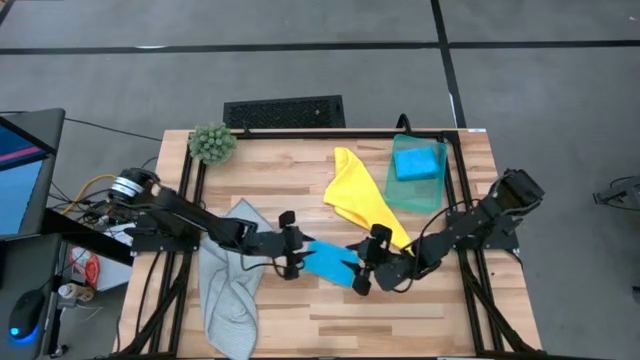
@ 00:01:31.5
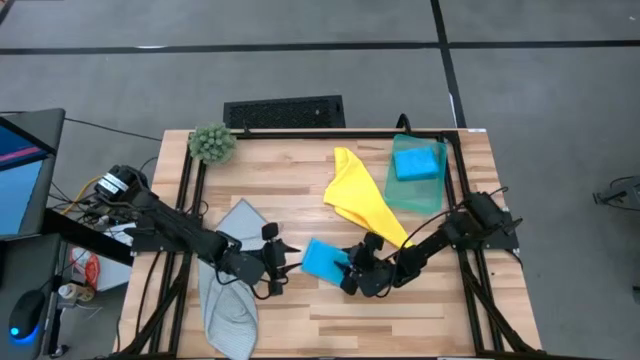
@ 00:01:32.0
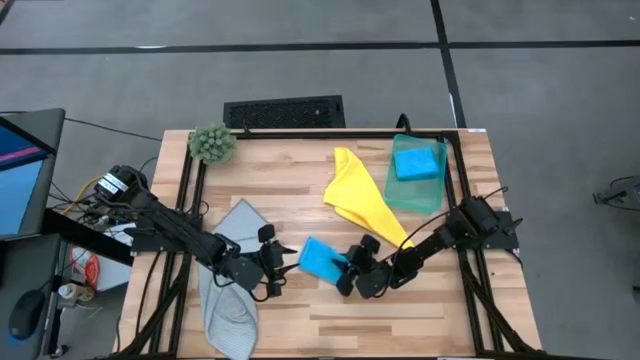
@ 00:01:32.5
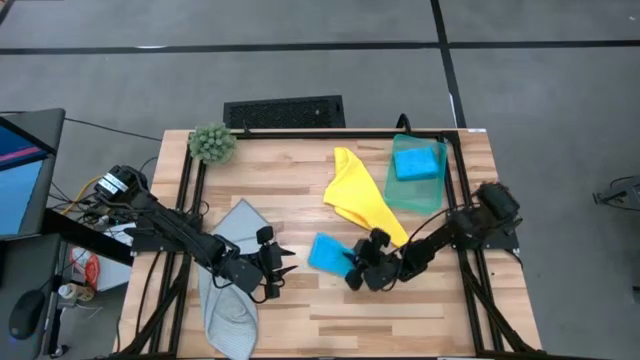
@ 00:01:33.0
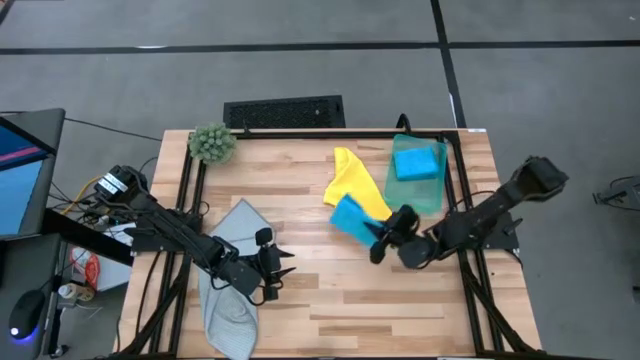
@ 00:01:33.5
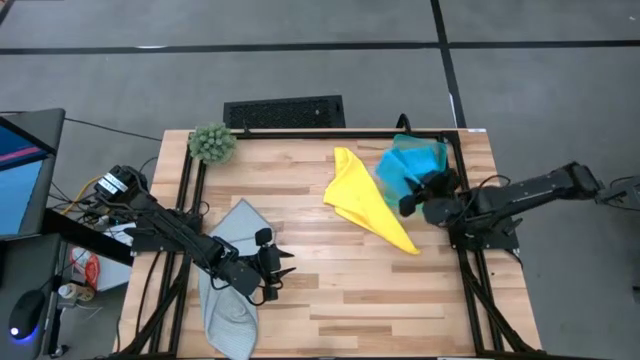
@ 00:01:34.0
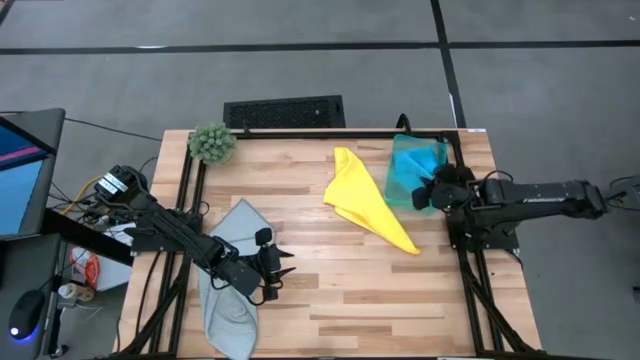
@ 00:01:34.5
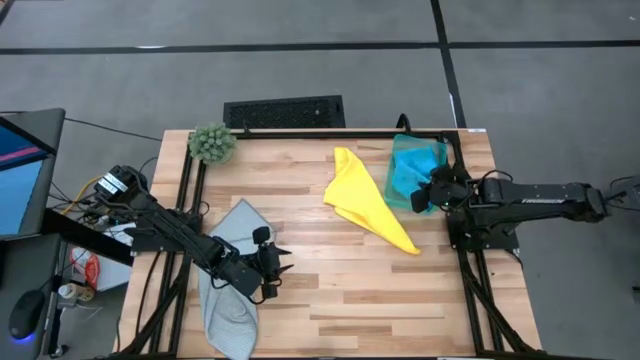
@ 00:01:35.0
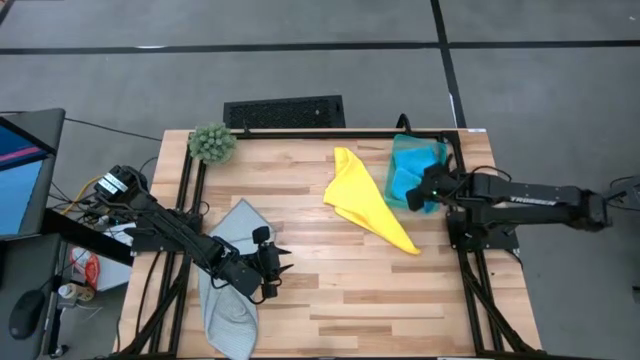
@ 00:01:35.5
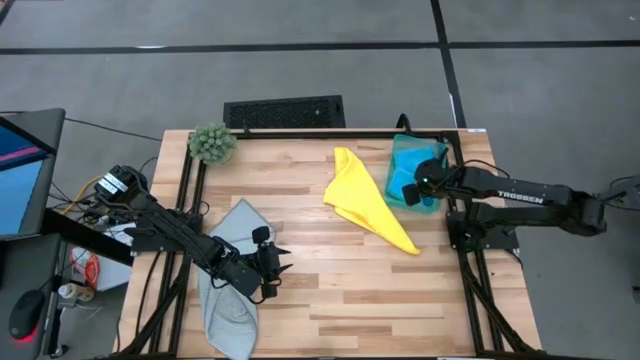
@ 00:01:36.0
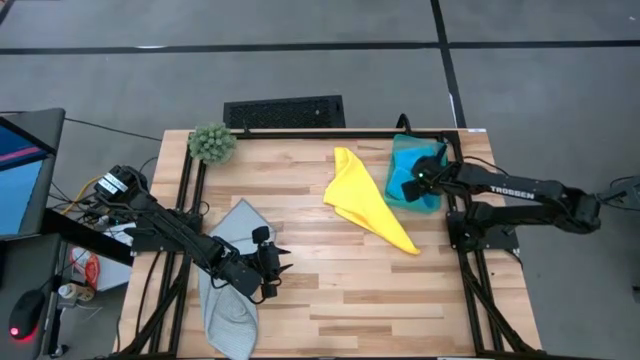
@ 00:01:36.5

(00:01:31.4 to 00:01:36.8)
Task: Fold microfiber towels
Put the folded microfiber cloth in the bin

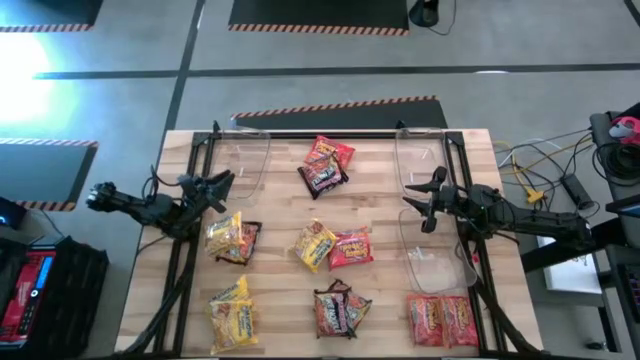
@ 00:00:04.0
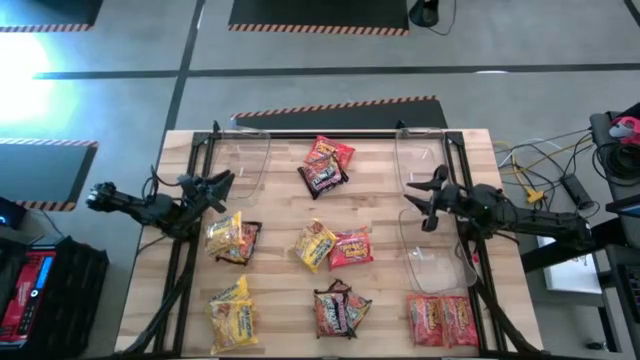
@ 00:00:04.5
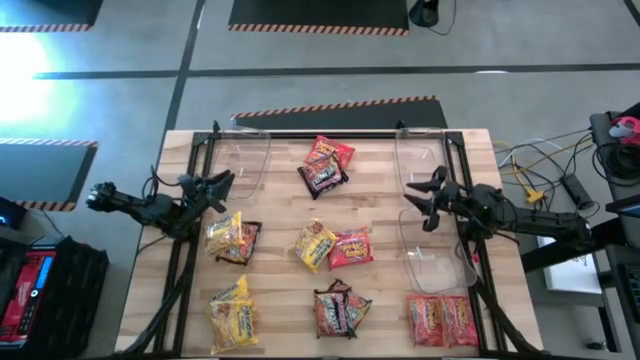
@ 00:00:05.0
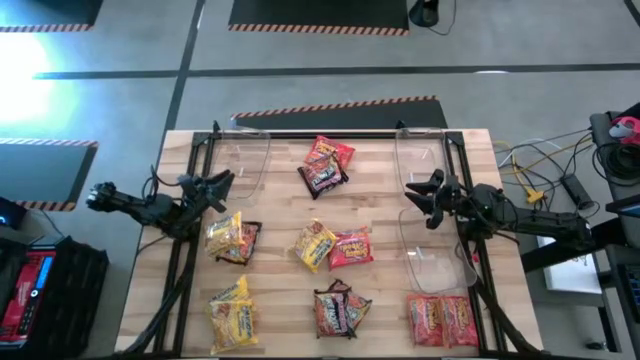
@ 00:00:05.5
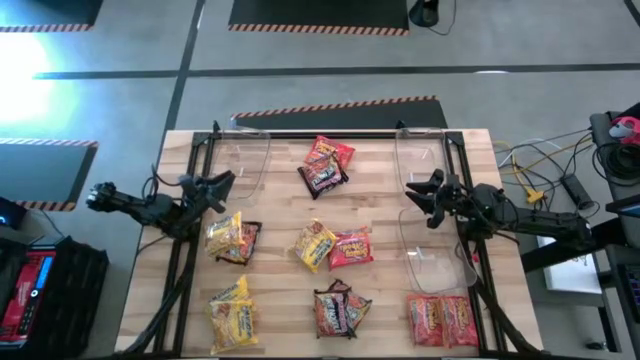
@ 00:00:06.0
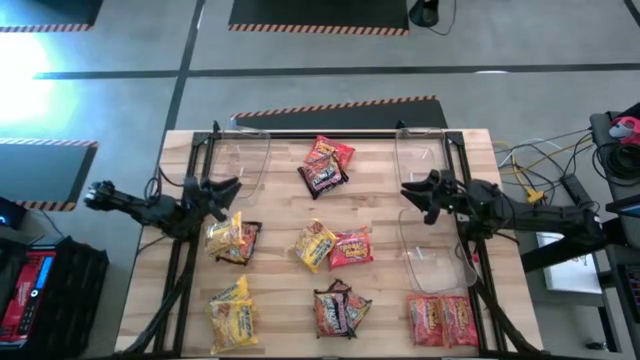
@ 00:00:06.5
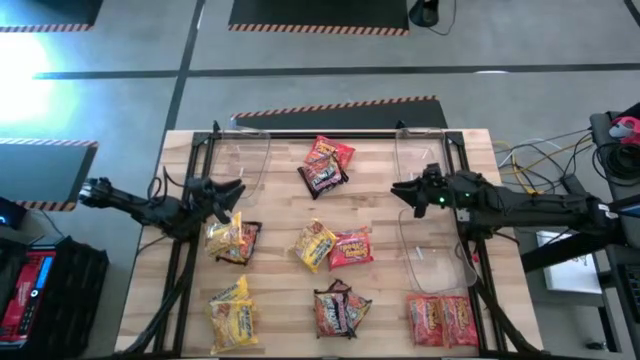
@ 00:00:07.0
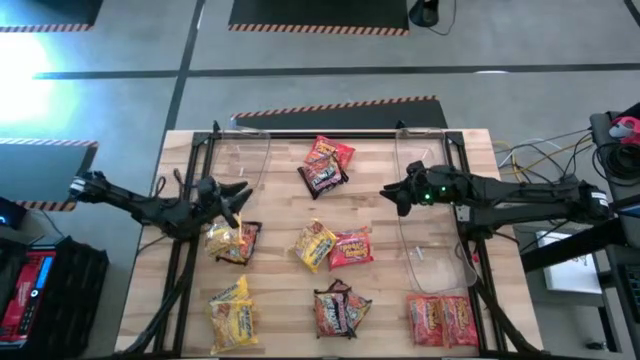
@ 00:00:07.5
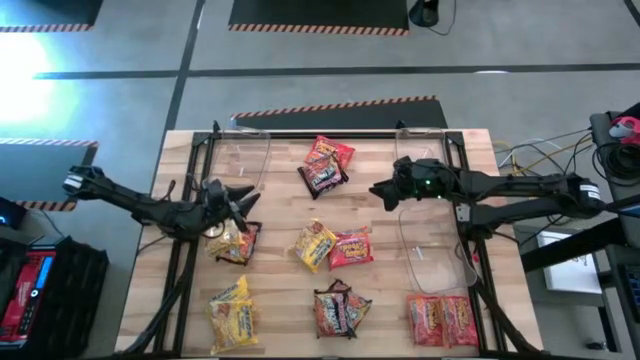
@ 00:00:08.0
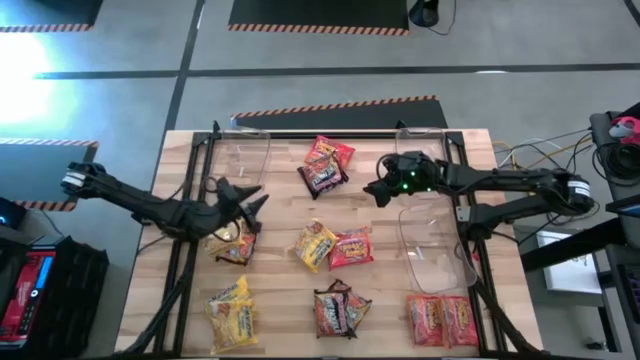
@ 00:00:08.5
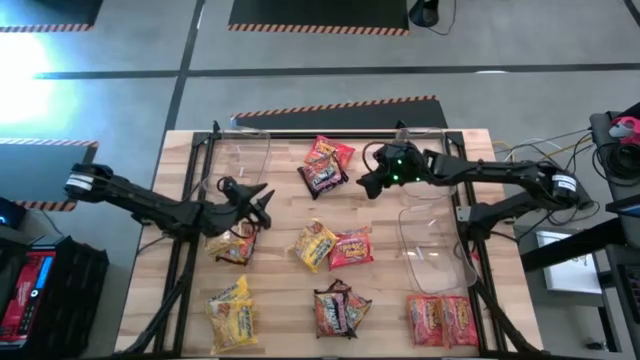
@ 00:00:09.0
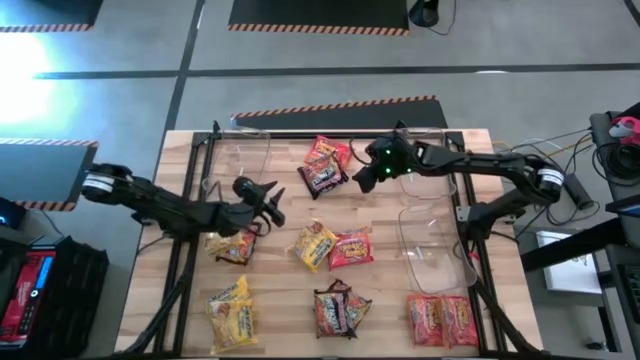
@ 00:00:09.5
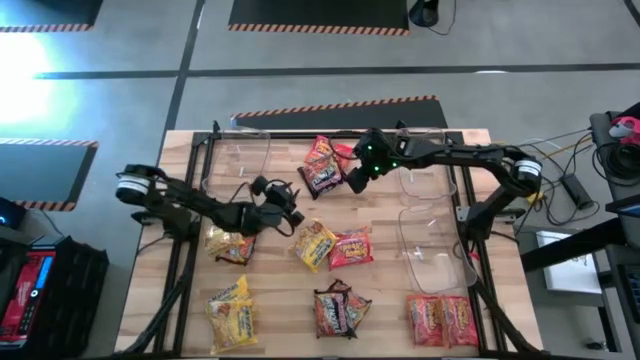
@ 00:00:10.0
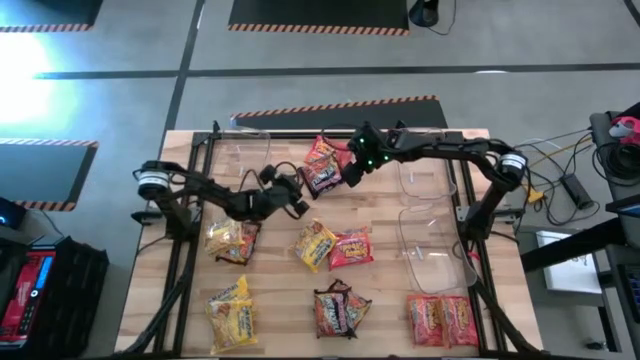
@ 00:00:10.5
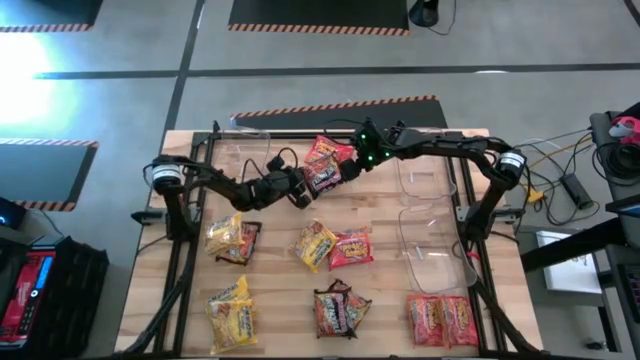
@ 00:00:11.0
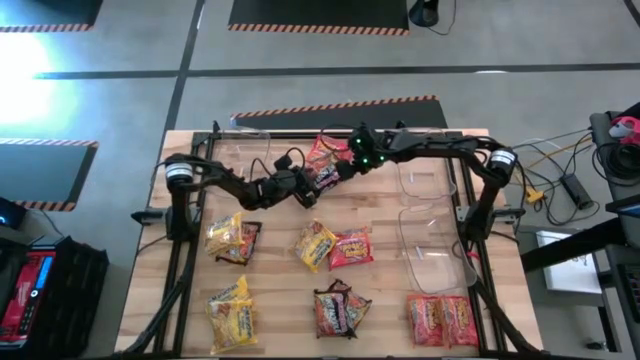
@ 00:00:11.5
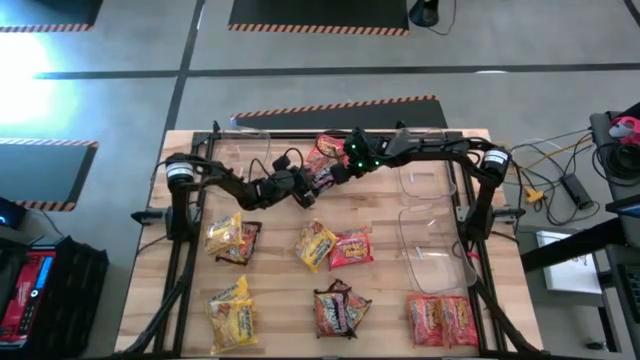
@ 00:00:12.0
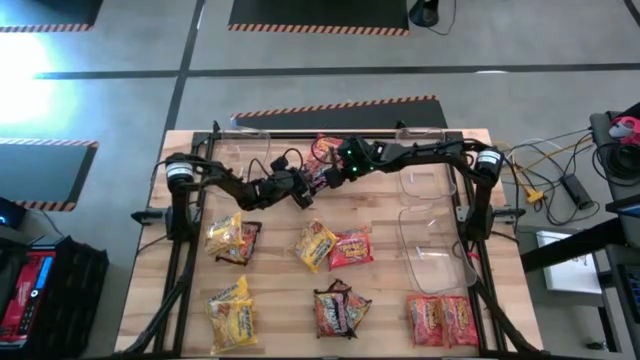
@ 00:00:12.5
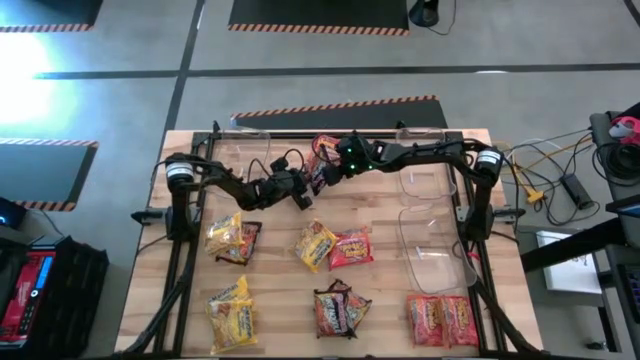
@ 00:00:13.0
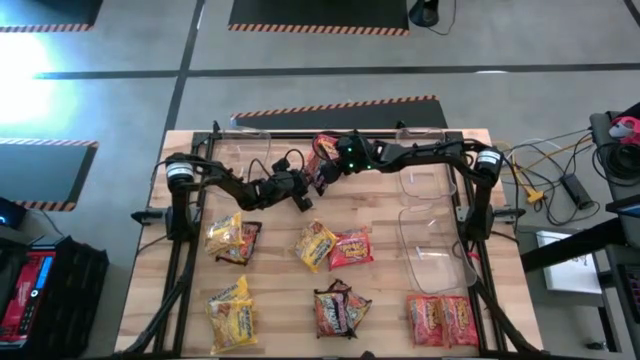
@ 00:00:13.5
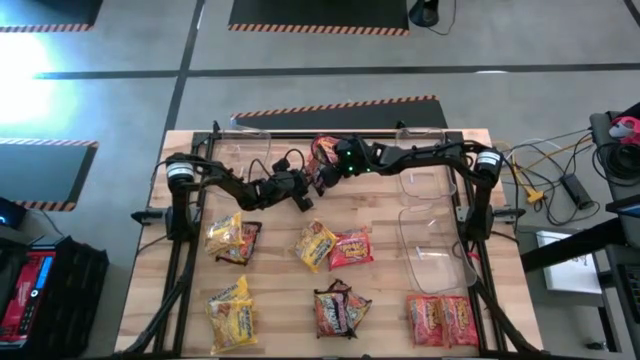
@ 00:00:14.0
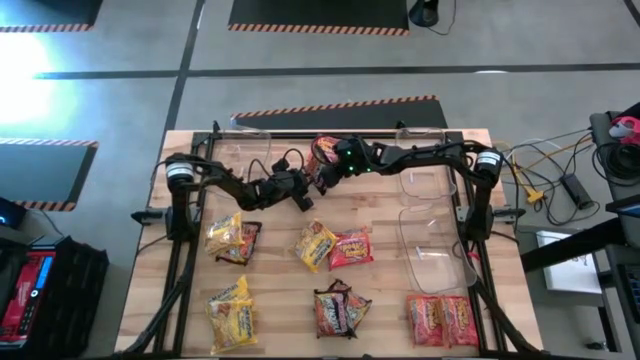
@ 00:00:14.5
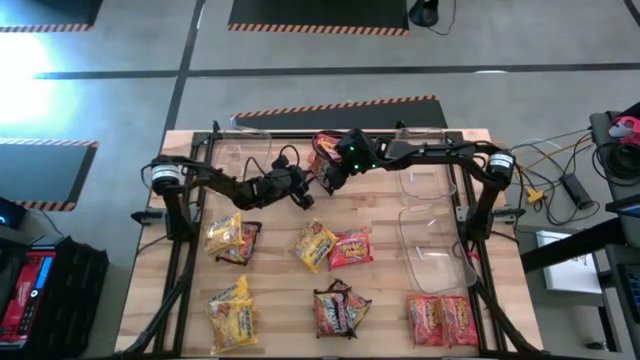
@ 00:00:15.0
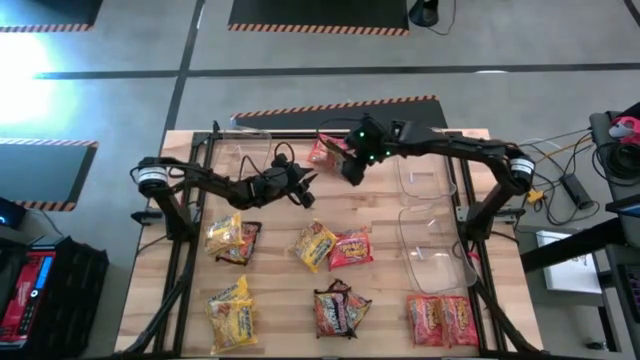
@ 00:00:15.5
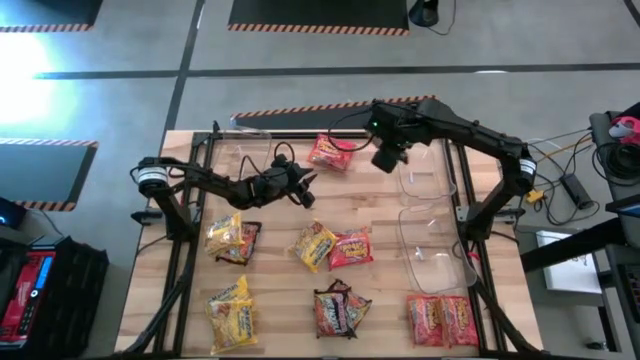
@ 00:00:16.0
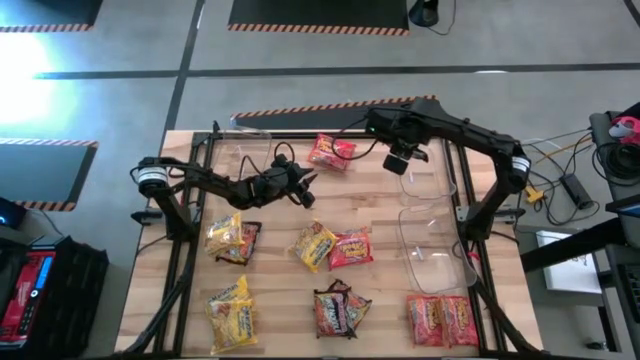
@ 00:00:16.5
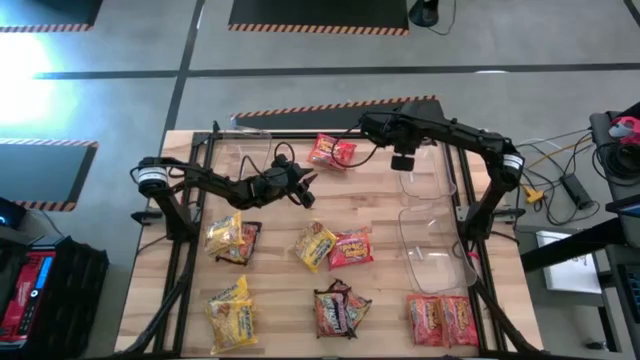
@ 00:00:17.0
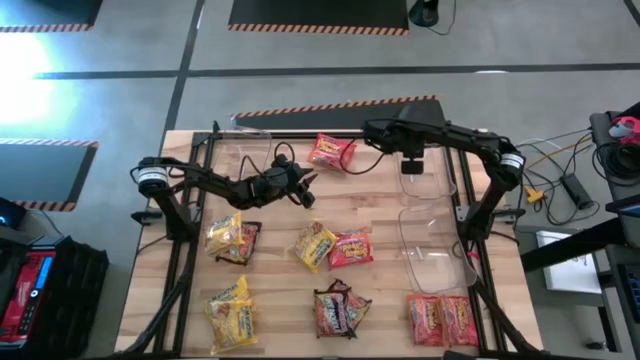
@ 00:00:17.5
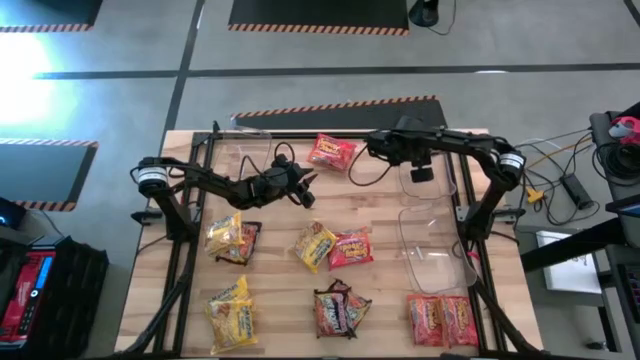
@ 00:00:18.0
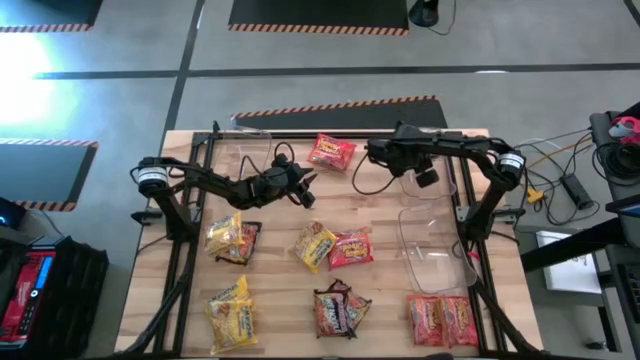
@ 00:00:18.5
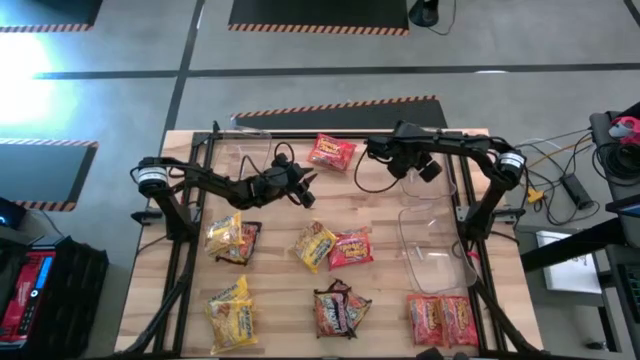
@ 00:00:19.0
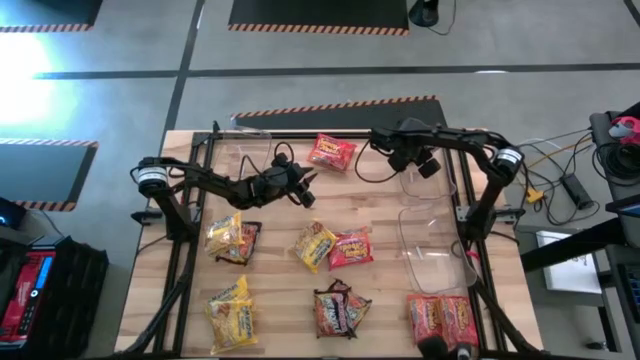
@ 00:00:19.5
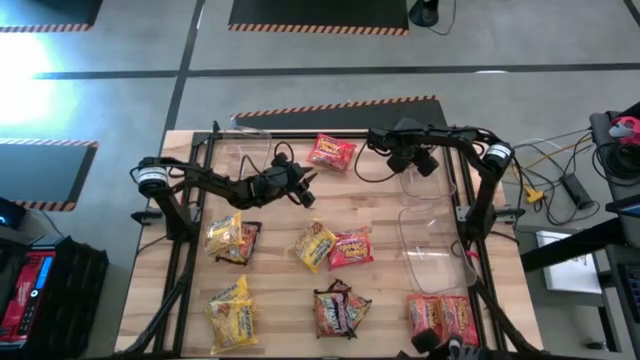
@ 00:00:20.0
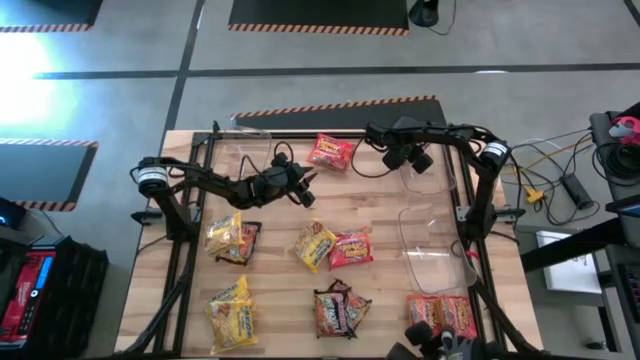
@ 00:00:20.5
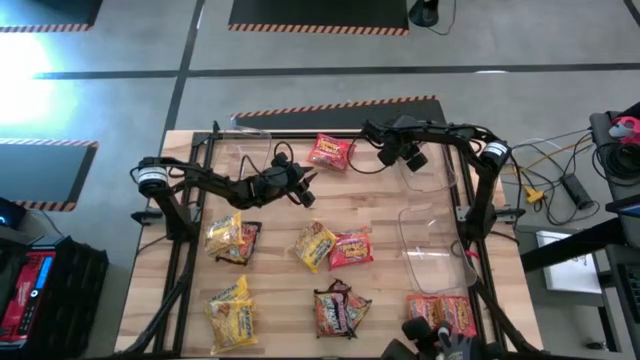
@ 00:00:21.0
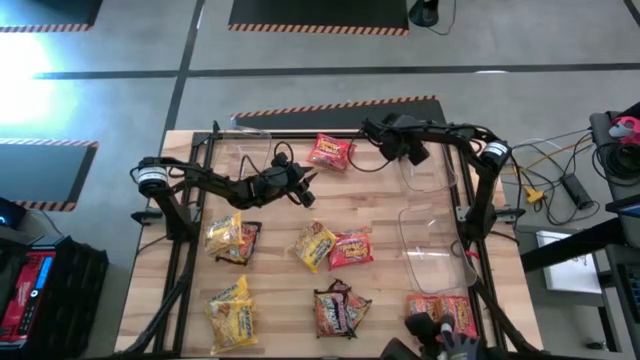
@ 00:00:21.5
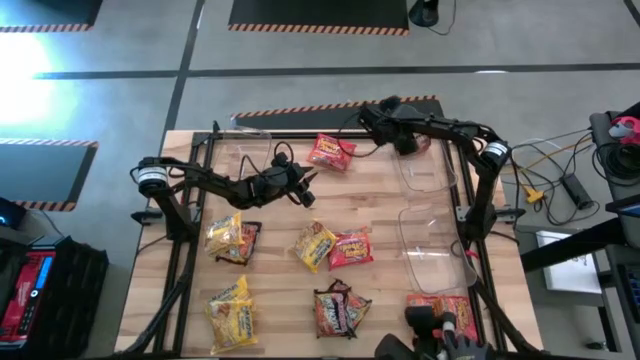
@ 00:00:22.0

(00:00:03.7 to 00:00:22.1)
Task: Sort Maruchan noodles
Put the black noodle pack into the top right transparent bin
